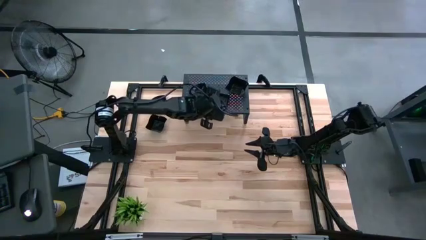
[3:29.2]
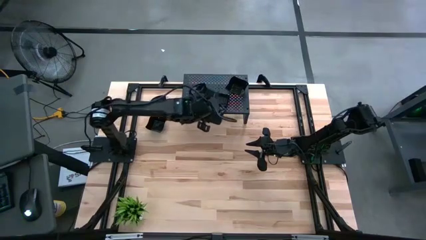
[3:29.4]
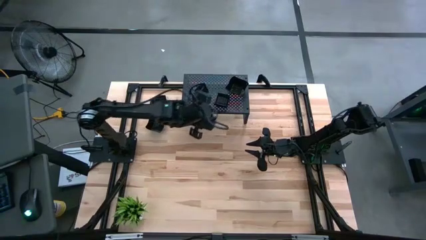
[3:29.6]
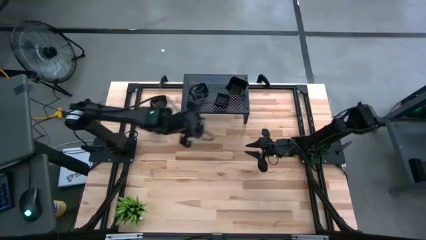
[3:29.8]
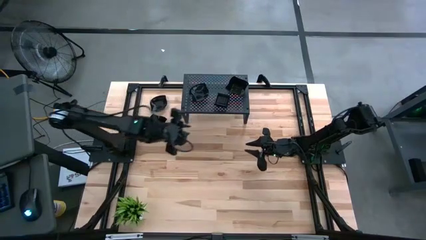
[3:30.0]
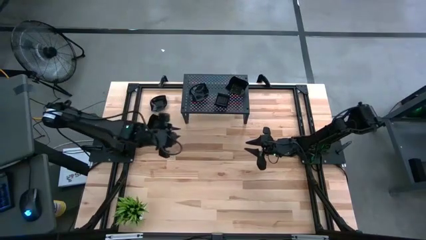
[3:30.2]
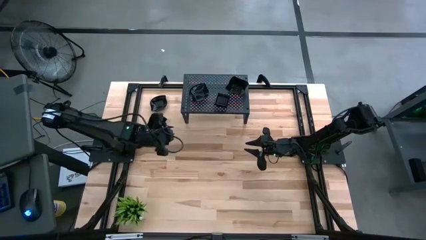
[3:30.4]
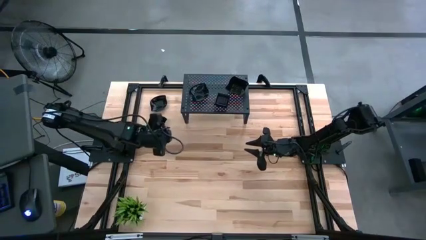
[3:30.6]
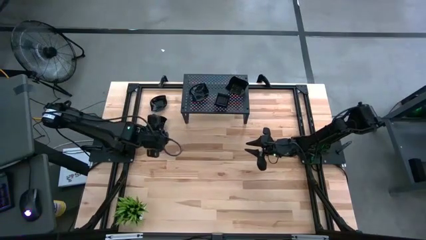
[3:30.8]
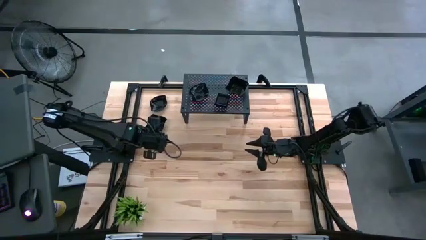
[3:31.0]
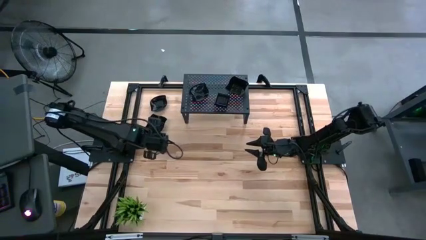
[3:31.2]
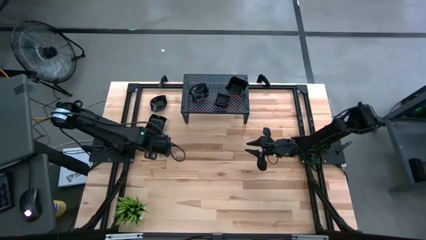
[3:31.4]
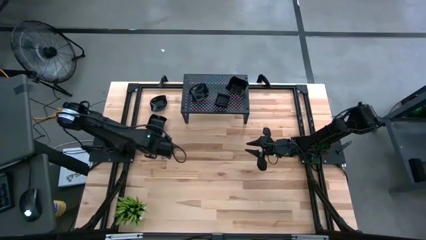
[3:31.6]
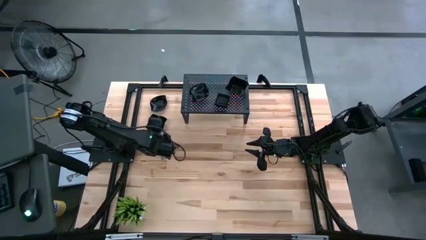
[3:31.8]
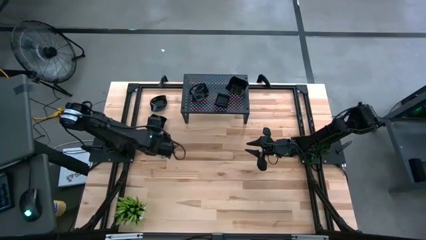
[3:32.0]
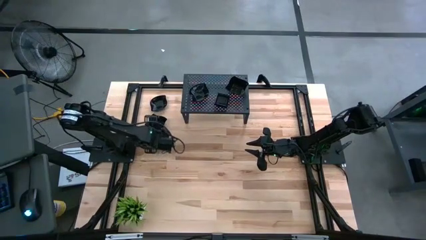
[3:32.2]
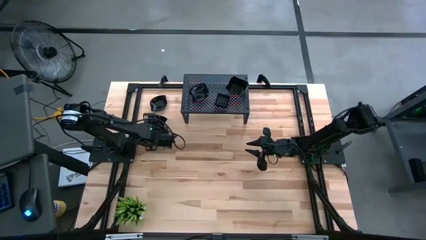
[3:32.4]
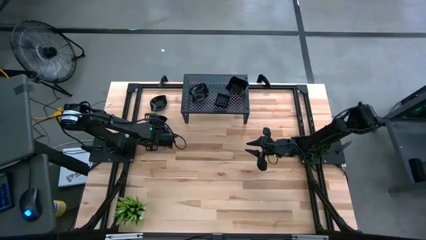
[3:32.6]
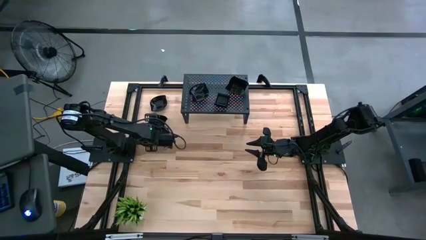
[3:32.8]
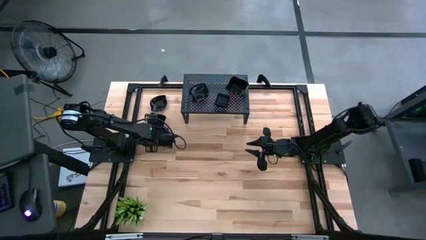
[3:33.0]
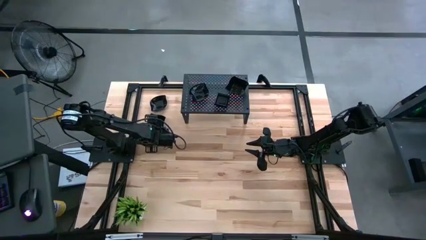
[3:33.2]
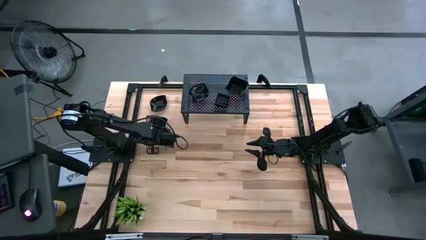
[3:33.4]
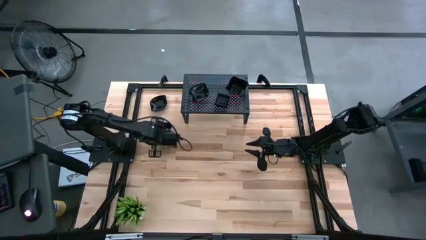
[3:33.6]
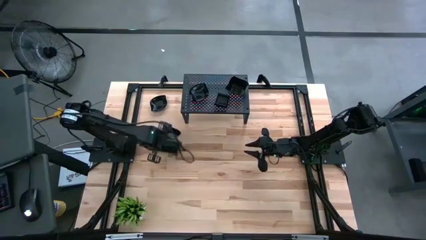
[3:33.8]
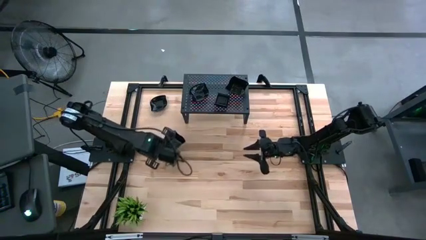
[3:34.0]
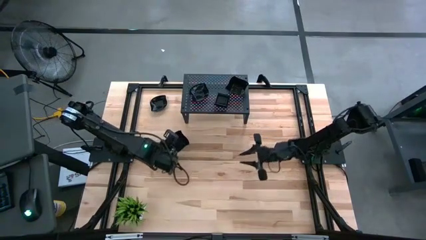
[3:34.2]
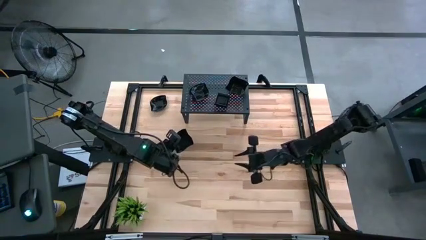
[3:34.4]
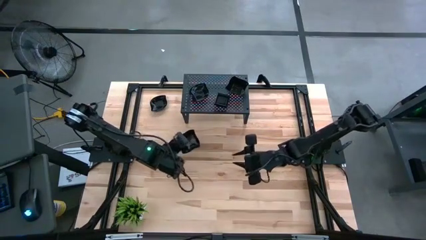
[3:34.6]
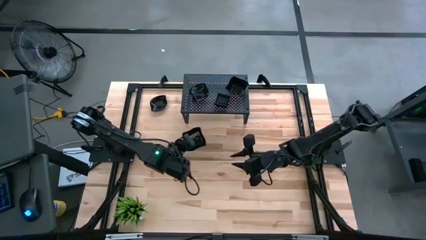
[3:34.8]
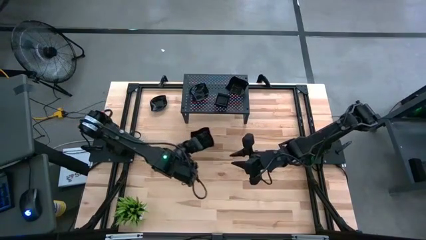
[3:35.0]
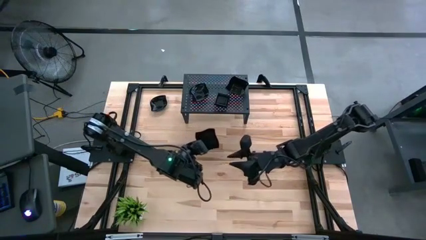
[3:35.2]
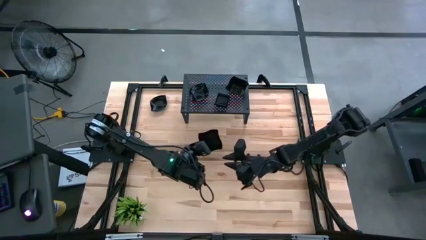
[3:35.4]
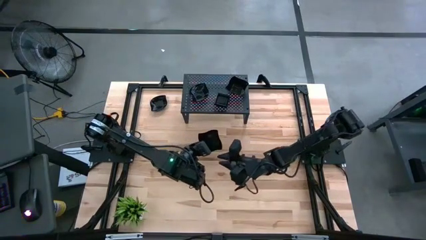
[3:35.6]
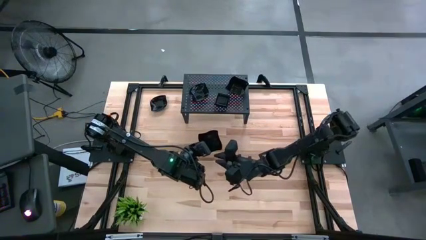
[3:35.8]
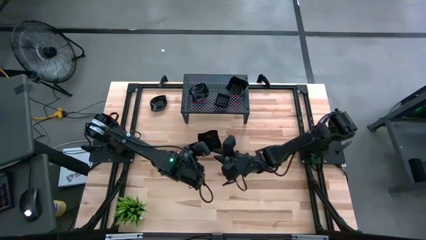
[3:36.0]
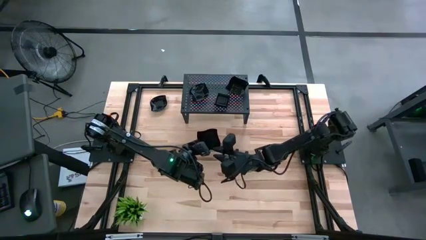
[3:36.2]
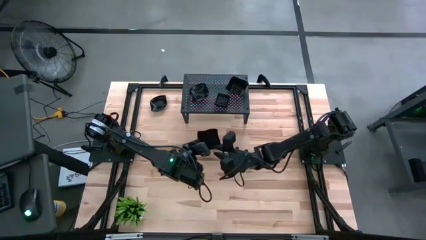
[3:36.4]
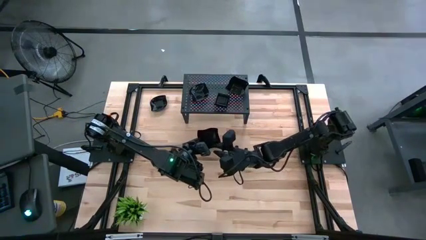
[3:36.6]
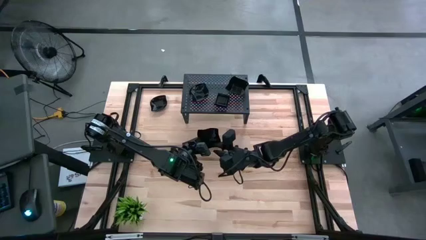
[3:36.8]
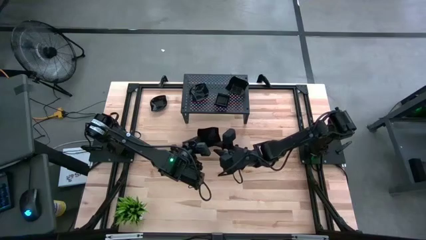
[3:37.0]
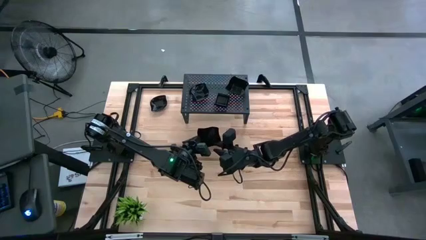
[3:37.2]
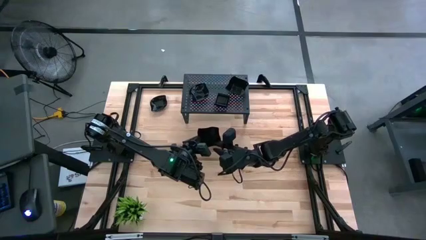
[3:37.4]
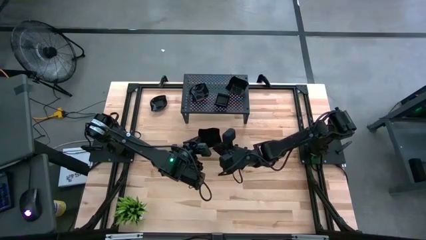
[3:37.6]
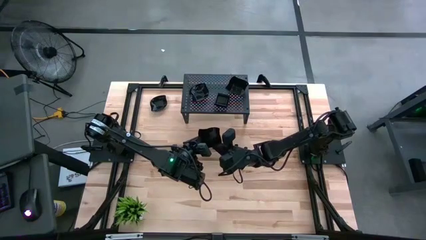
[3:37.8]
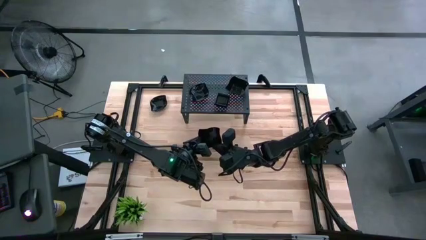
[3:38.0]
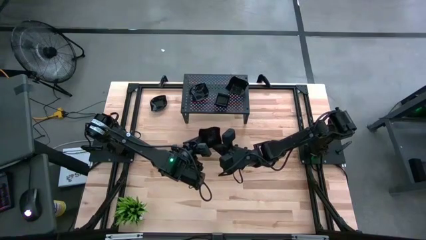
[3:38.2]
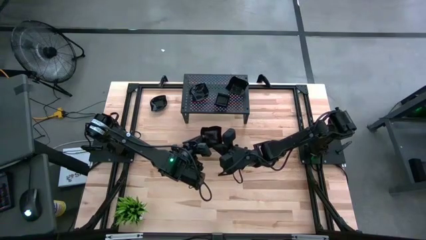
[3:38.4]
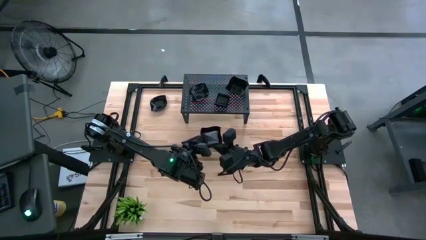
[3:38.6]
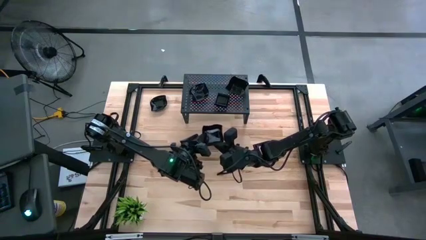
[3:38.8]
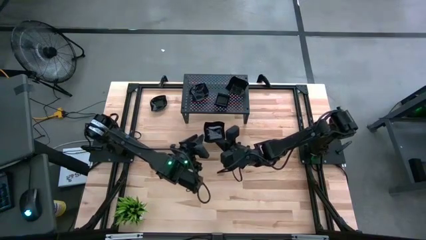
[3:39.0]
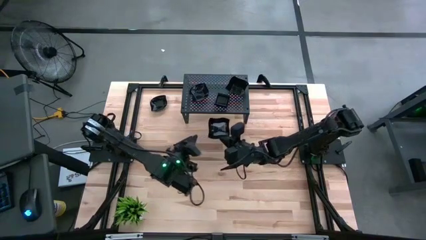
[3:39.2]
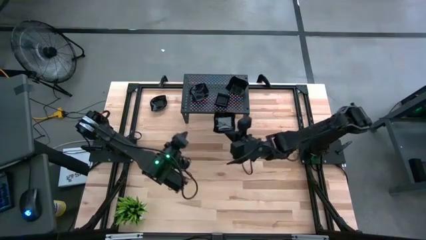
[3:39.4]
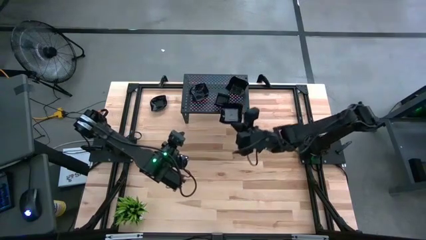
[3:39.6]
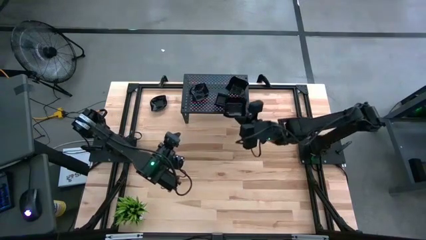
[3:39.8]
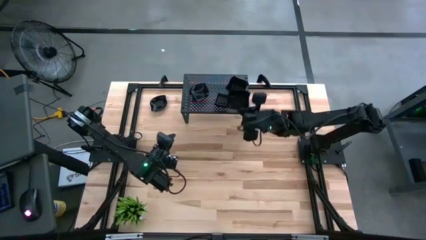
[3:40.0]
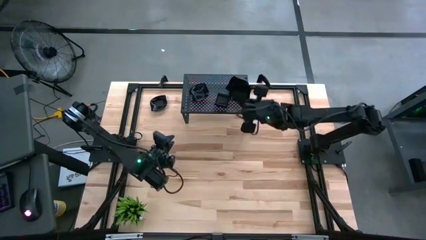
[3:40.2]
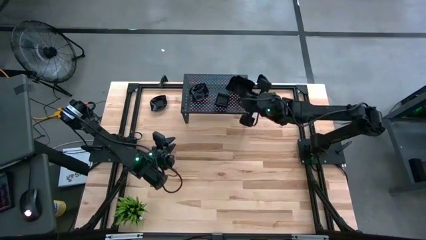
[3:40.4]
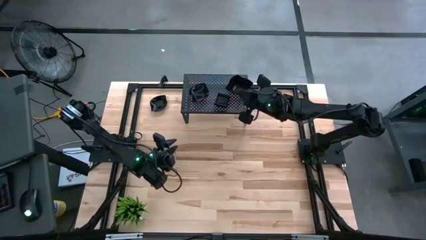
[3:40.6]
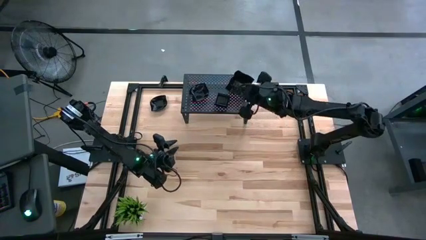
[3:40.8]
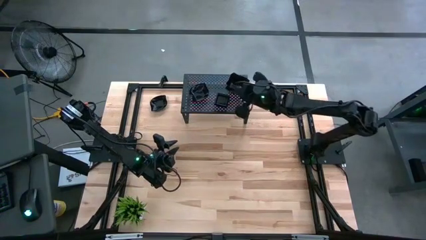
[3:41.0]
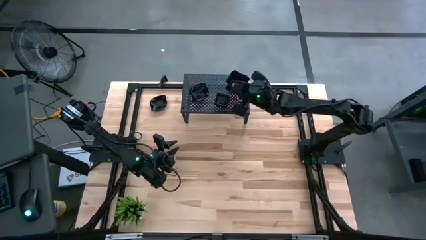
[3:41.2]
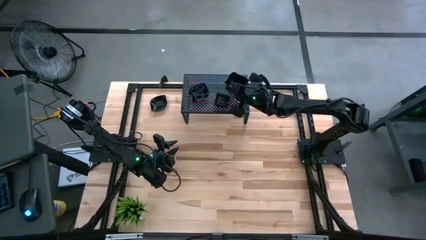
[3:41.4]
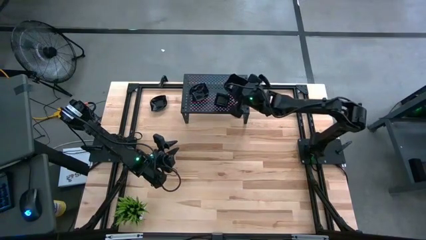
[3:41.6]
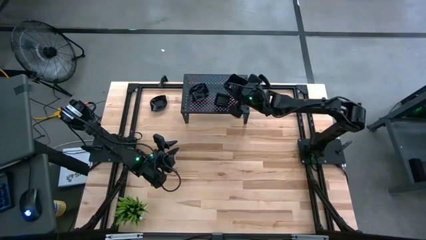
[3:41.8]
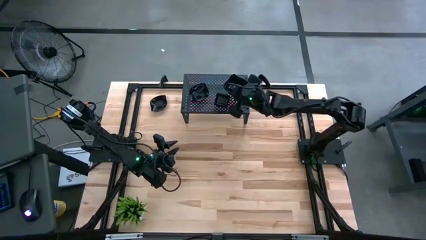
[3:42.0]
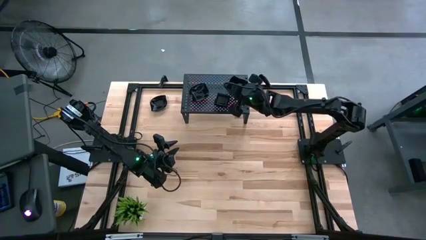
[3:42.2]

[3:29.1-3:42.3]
Task: Pick & Place Mini shaped plates
Stack the black distorted square plate on top of the black distorted square plate on the shelf

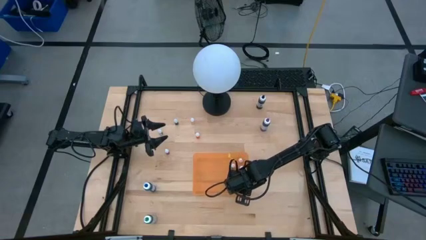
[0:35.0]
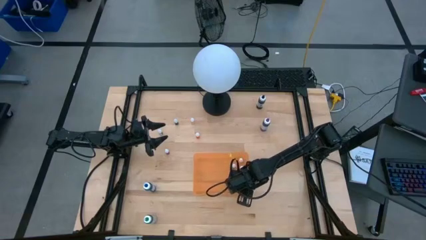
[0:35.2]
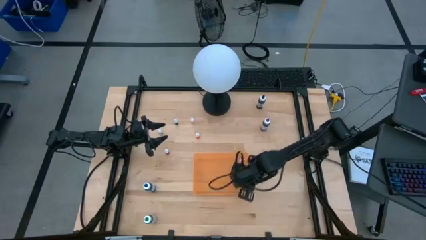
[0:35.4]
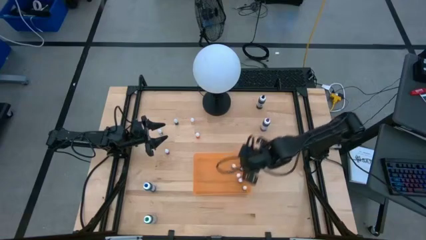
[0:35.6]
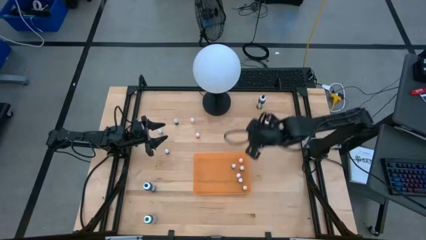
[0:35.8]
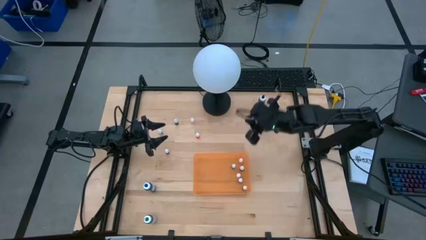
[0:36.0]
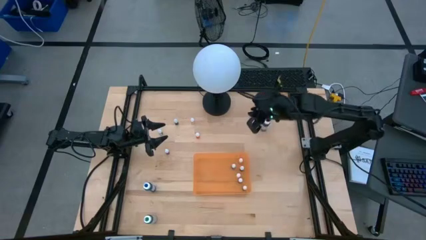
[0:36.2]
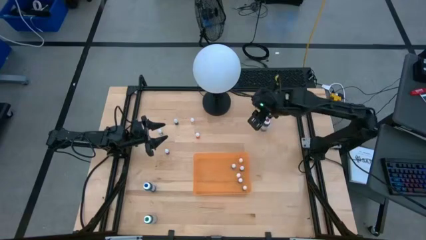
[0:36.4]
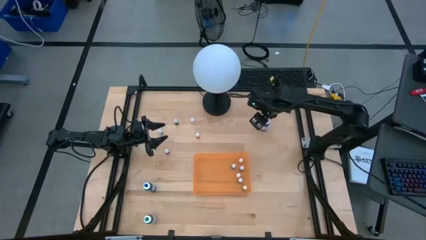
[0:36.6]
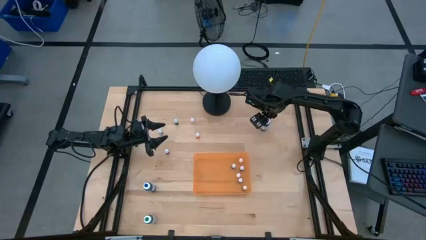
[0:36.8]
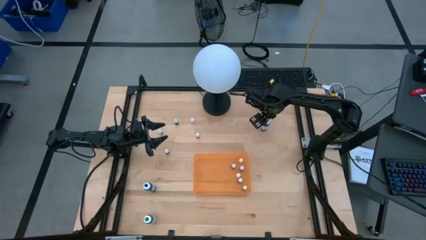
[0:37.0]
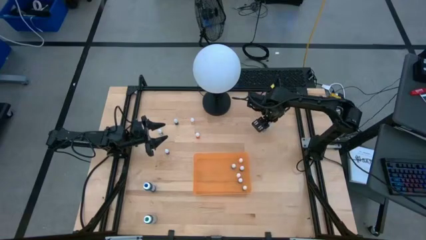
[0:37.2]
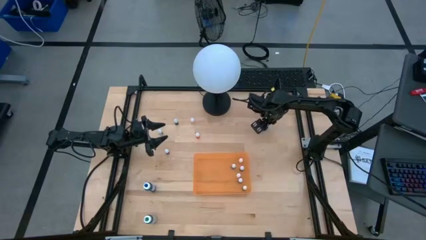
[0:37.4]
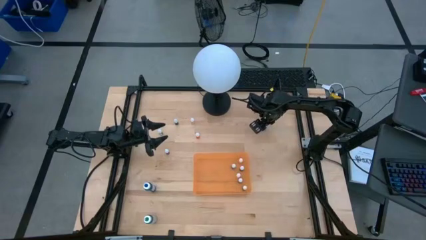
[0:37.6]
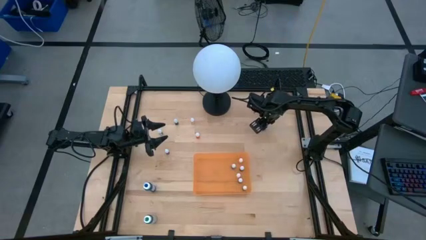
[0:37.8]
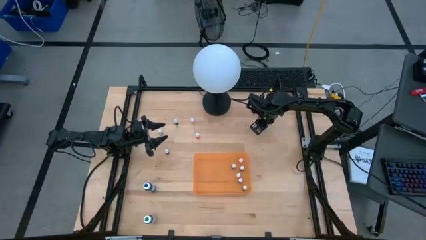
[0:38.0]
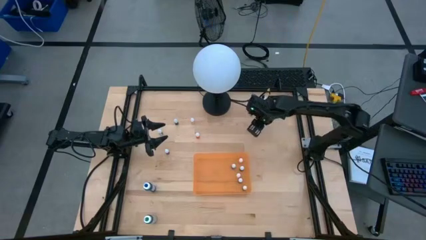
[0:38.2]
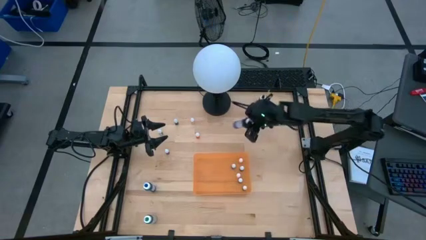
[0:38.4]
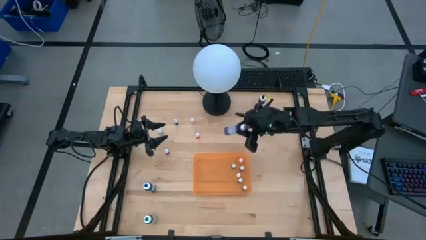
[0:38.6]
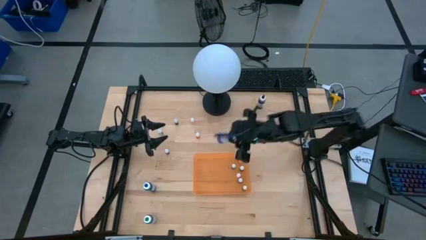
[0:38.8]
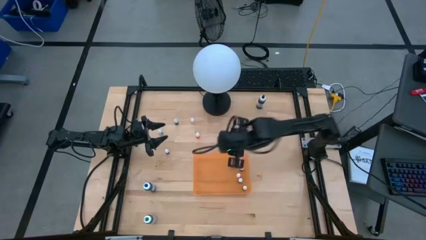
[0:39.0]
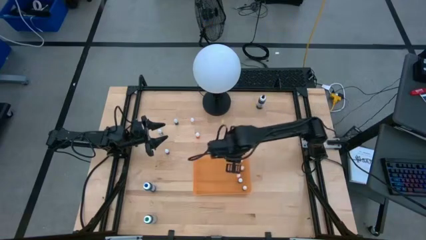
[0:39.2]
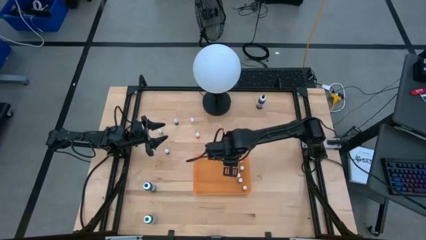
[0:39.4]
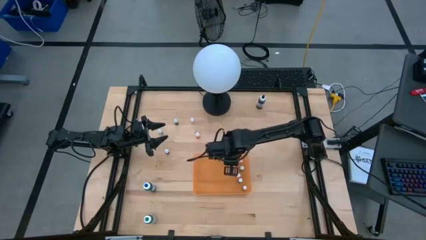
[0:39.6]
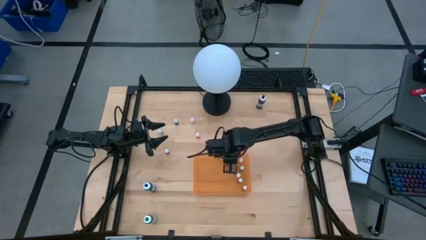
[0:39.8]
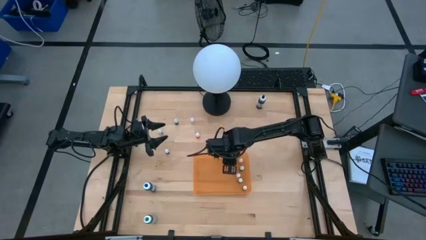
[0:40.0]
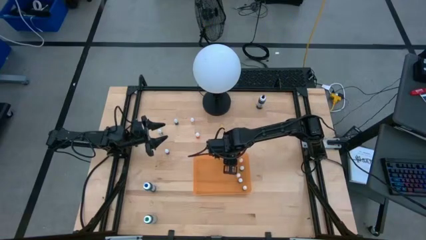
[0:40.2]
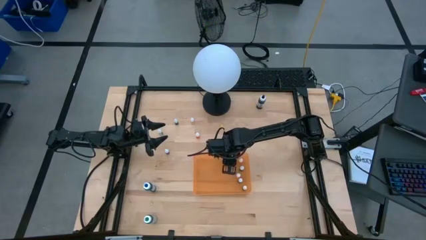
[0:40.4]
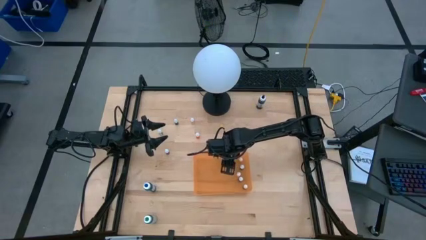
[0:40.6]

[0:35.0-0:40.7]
Task: Pick & Place food coloring
Put the large purple food coloring bottle into the orange container
